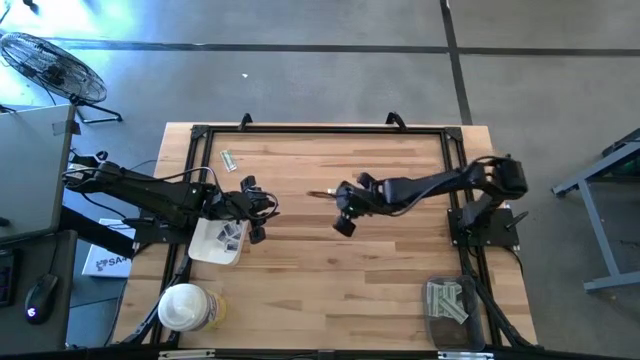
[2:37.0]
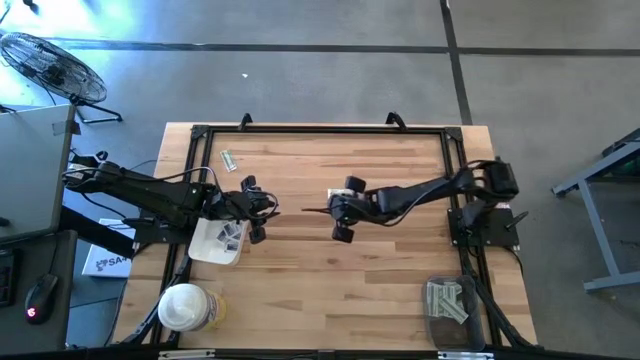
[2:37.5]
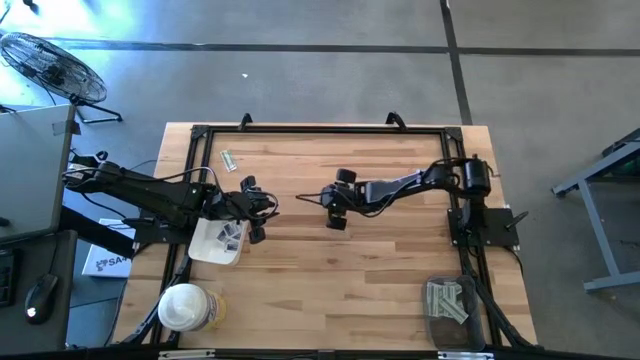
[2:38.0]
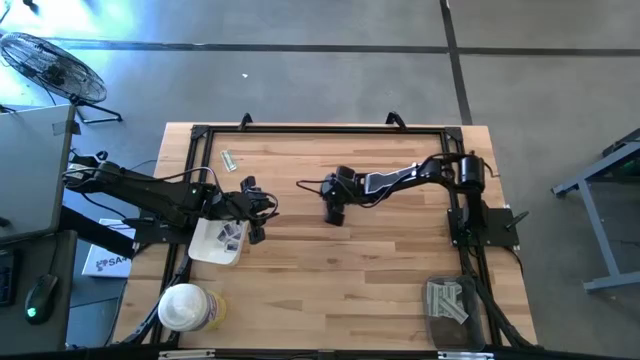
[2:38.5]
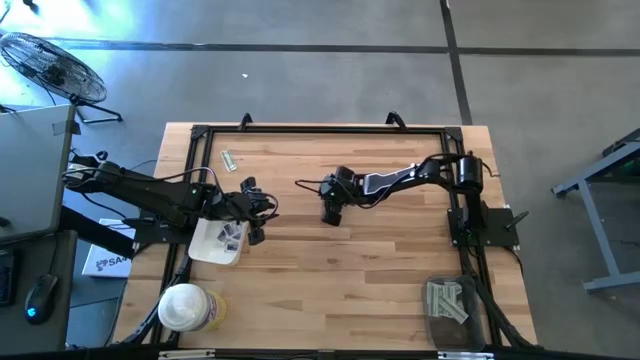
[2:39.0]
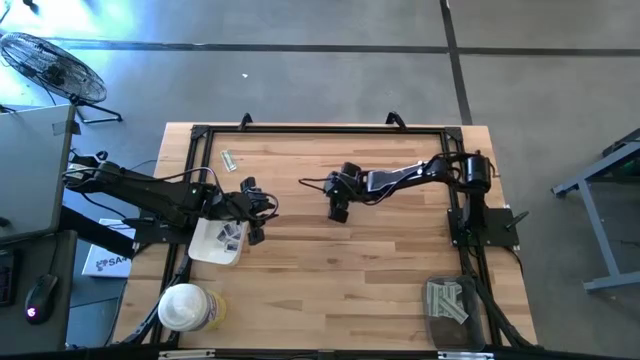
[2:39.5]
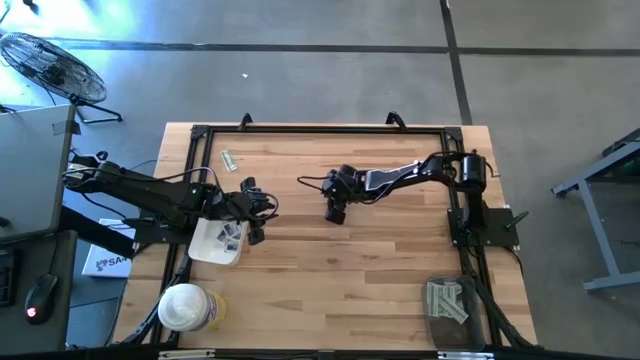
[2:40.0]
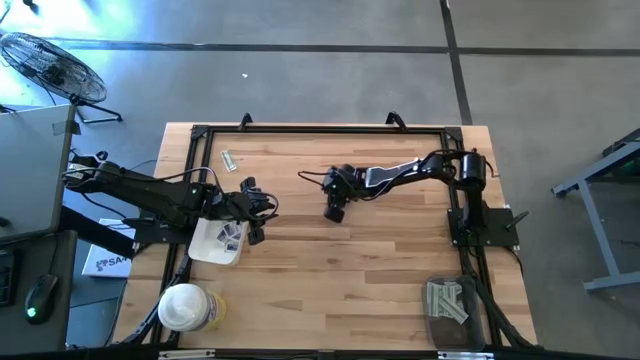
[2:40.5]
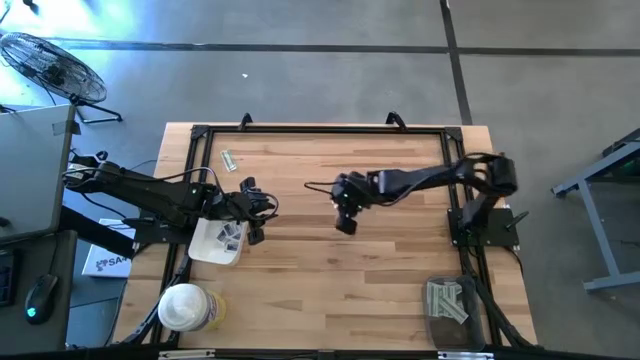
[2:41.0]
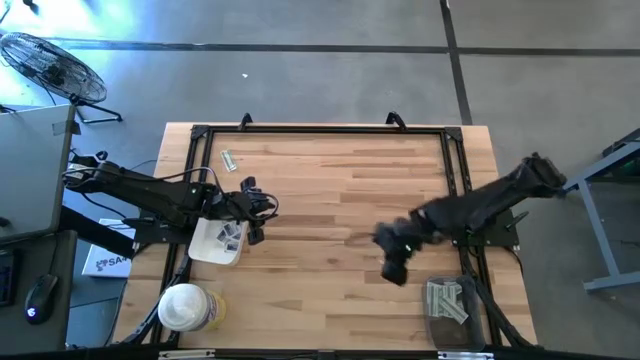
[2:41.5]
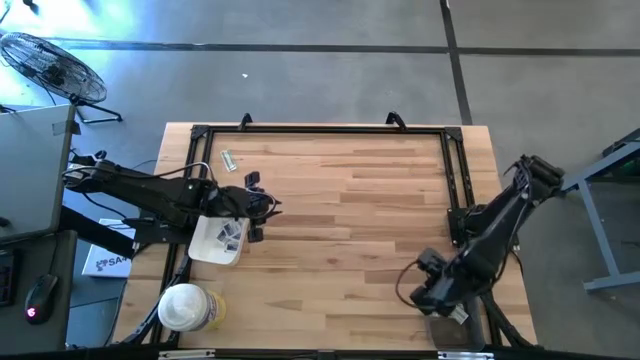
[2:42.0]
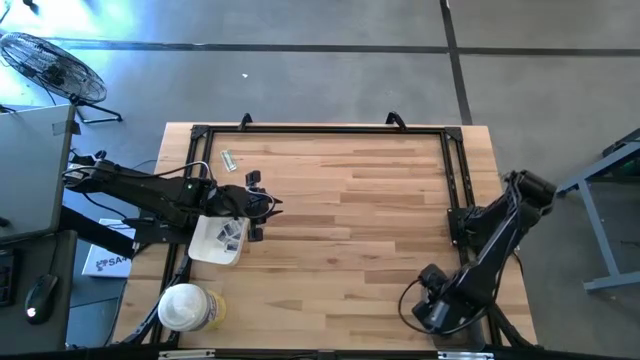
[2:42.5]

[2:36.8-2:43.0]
Task: Pick & Place First Aid Supplies
Put the green bandage pack into the black bin

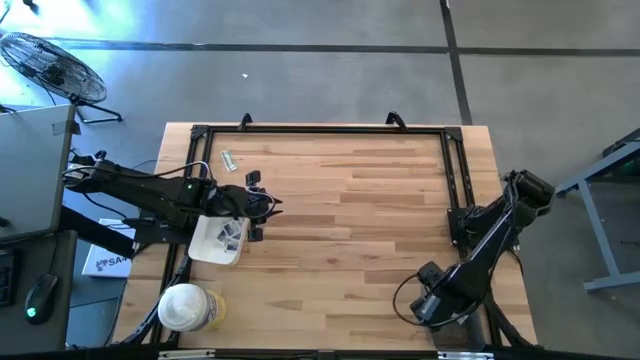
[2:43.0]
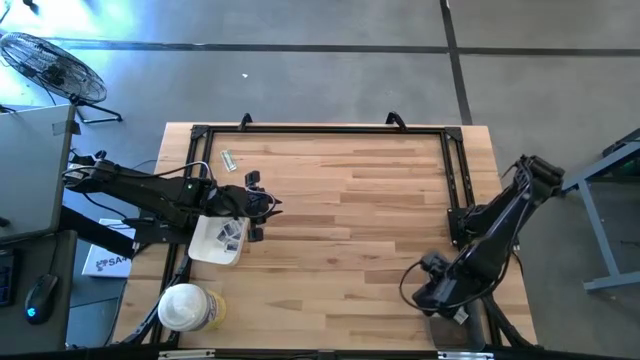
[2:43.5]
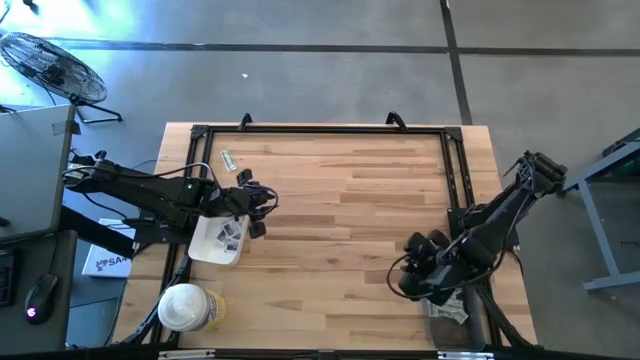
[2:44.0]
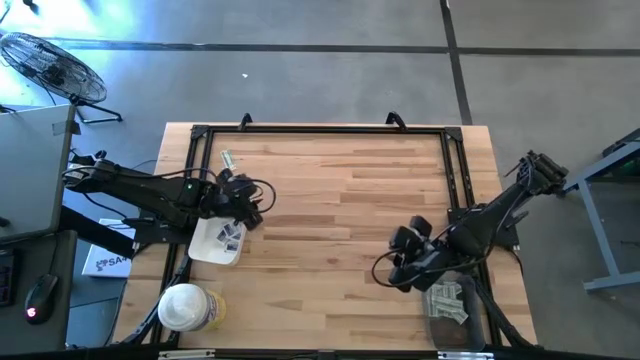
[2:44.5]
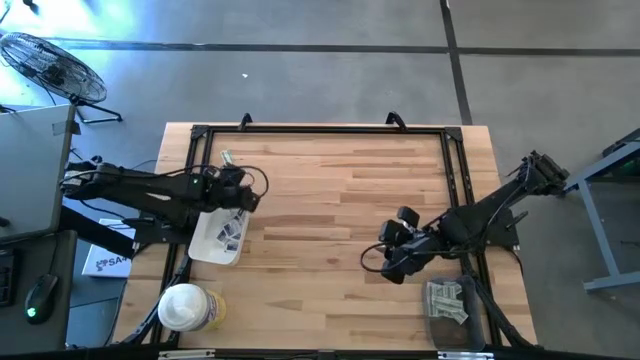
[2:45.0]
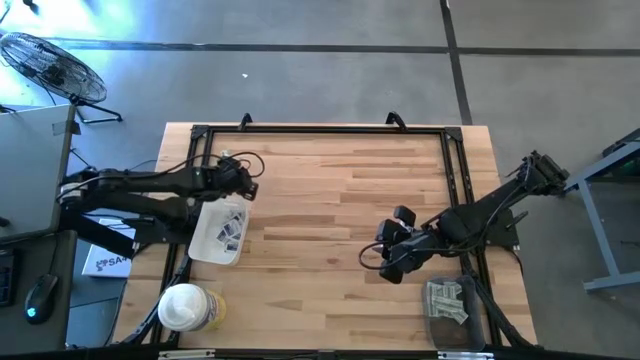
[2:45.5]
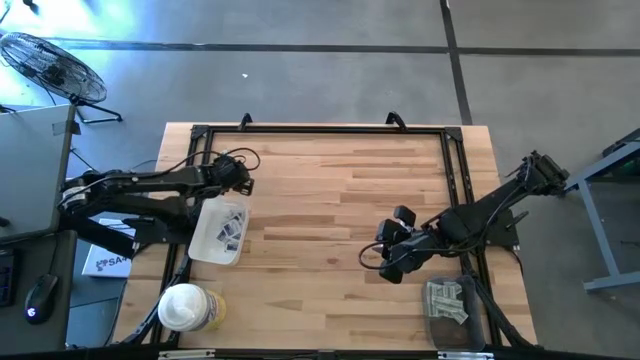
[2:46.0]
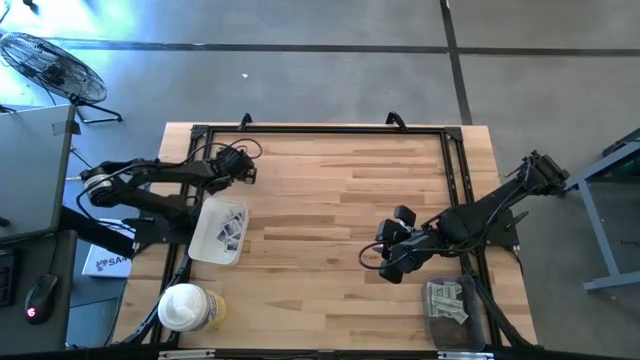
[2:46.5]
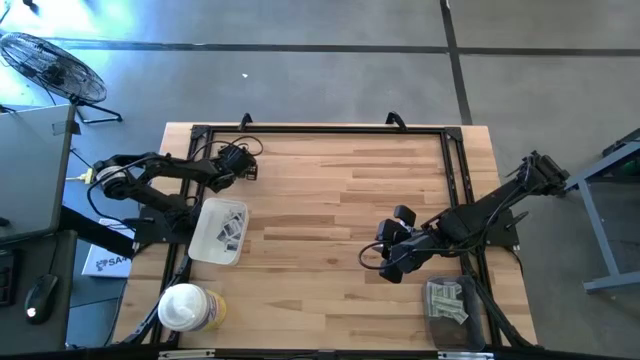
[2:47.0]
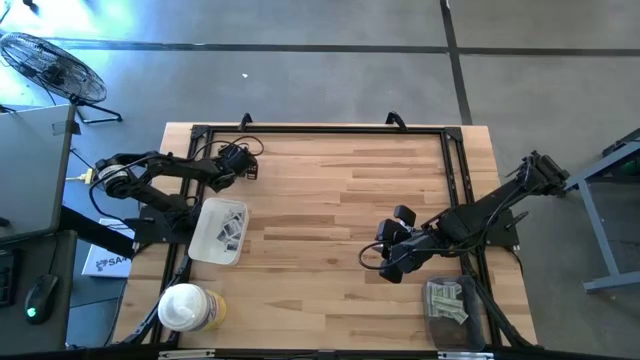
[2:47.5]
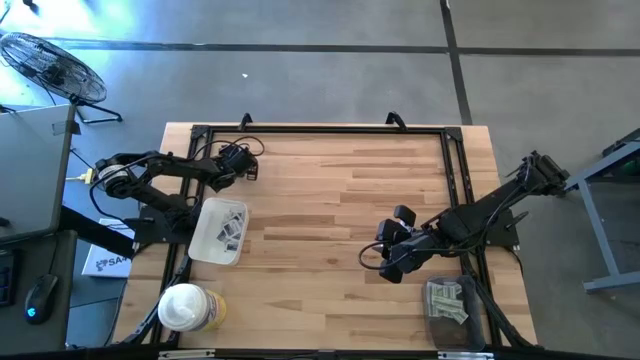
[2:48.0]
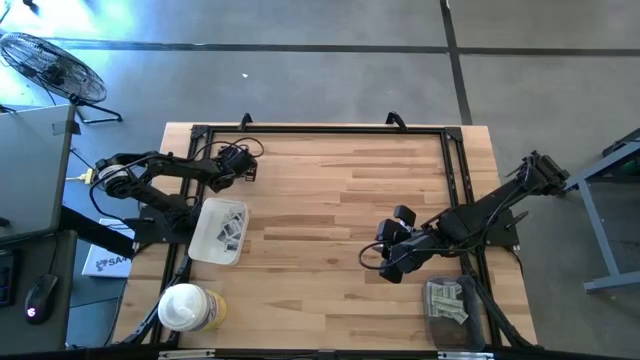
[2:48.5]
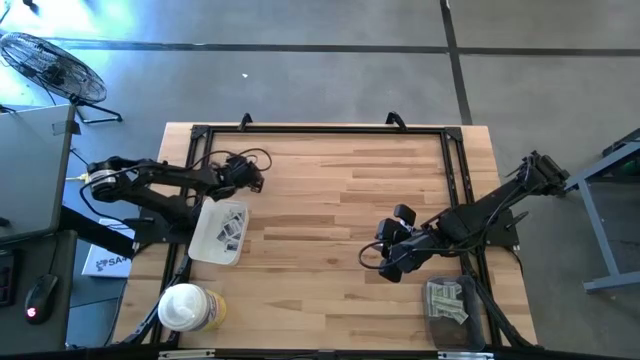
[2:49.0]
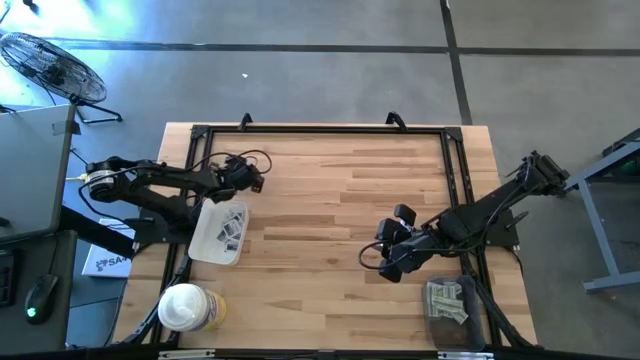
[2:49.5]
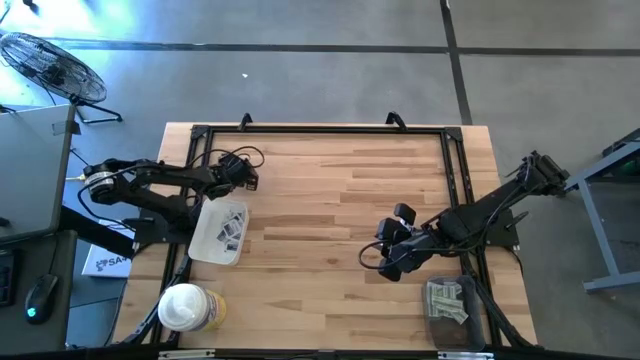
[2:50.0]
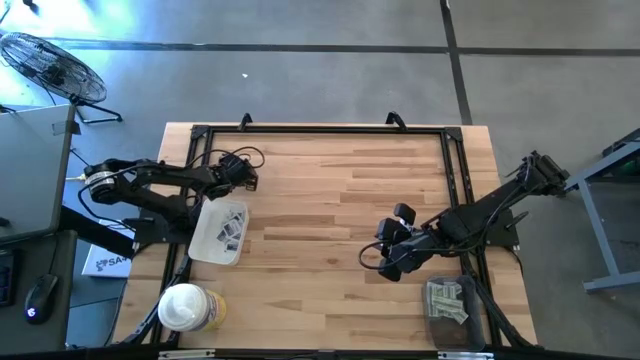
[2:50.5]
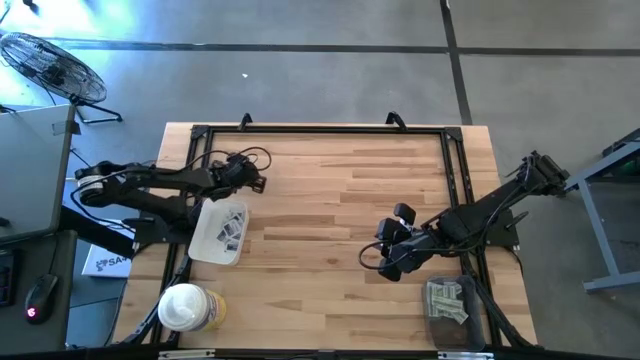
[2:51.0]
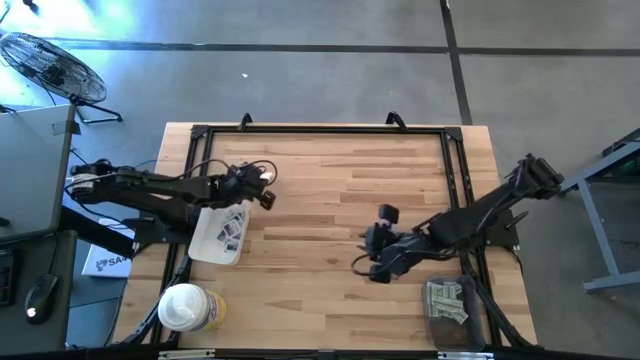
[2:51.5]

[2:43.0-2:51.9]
Put the green bandage pack into the black bin

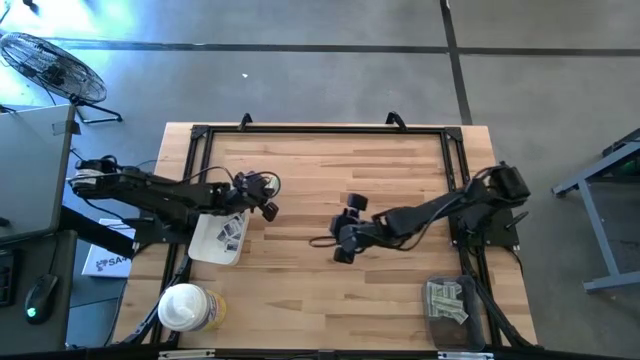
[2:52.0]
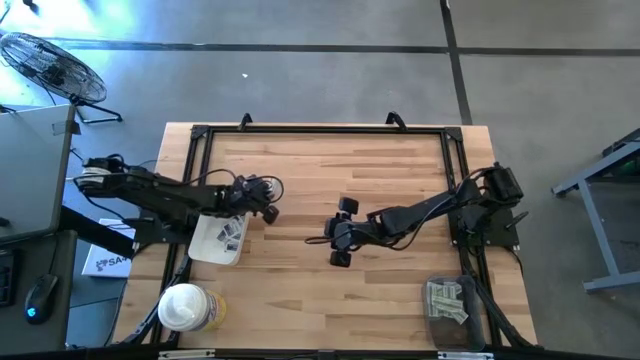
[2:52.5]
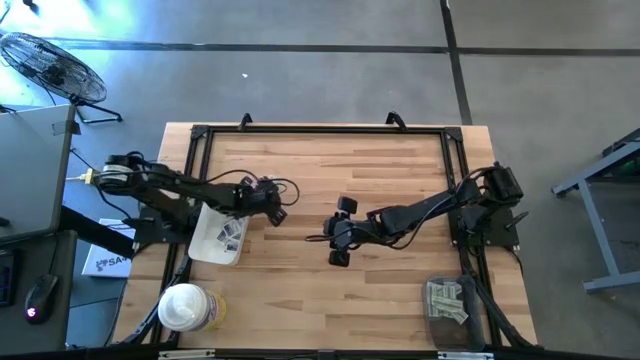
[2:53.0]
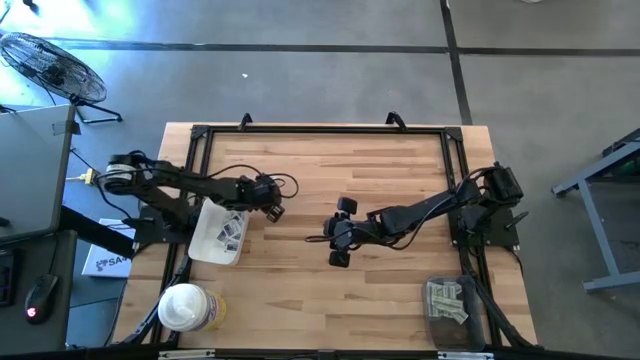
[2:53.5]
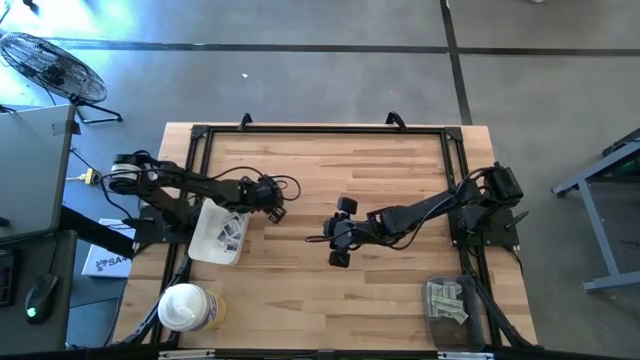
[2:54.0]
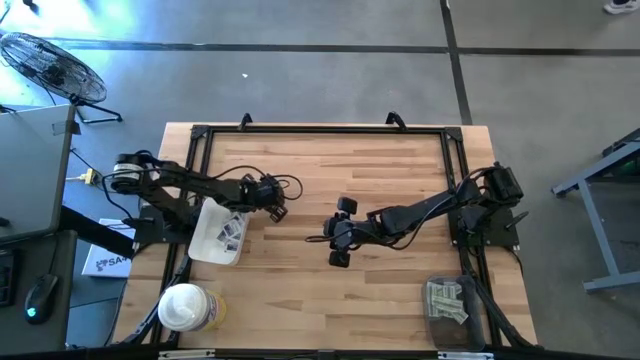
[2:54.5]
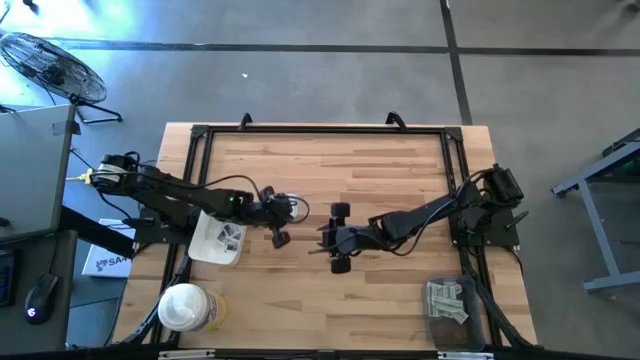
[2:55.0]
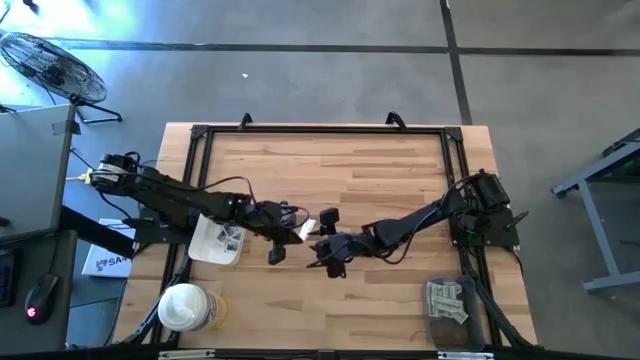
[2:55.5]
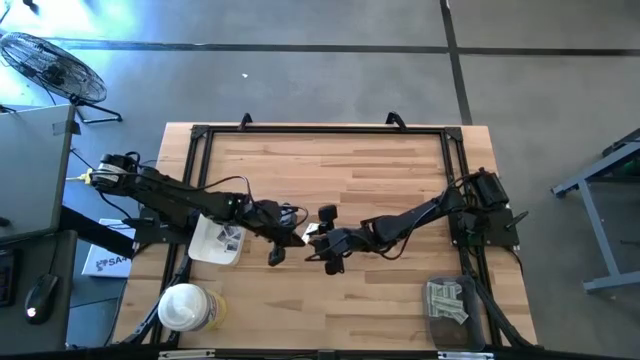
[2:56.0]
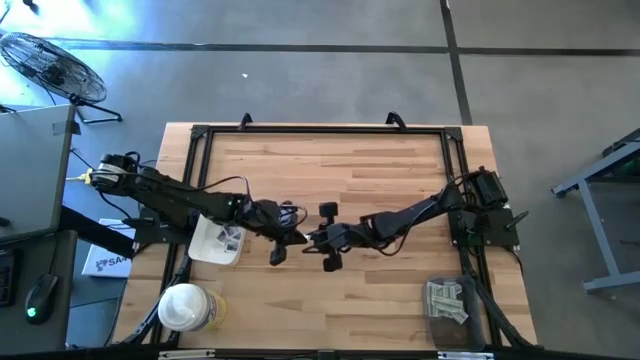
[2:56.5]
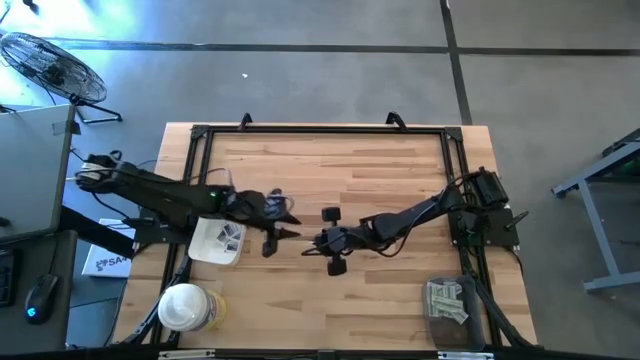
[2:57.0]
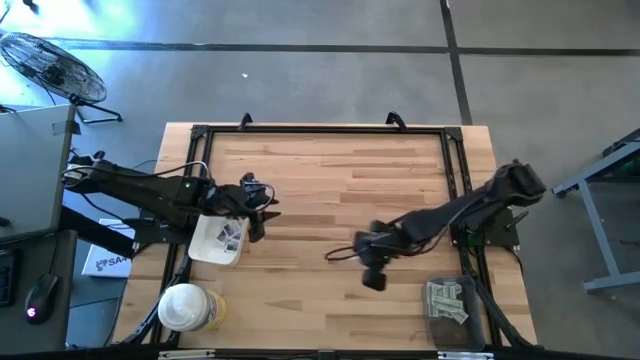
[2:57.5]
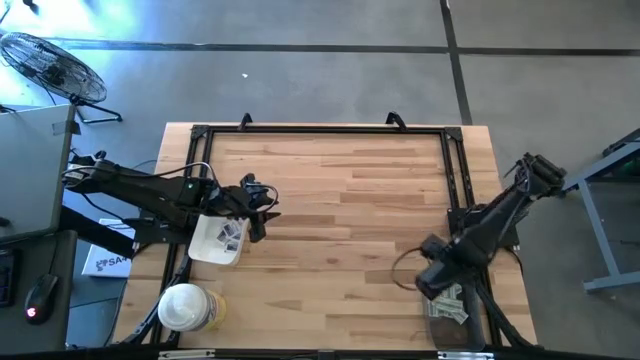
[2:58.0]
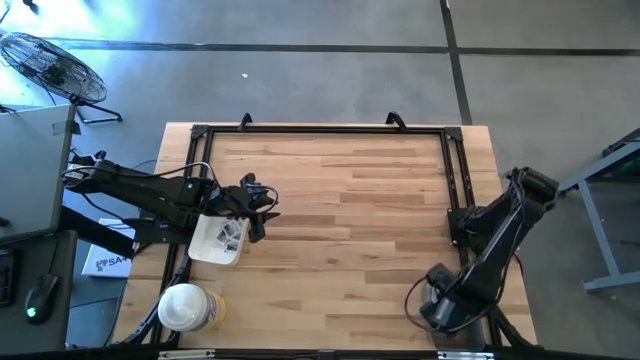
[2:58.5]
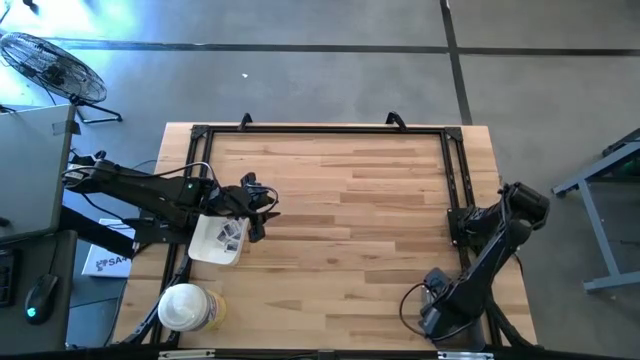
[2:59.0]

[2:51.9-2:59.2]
Put the green bandage pack into the black bin
